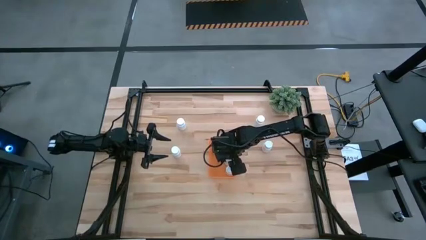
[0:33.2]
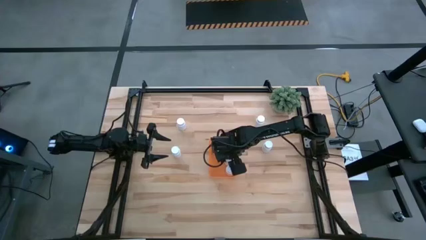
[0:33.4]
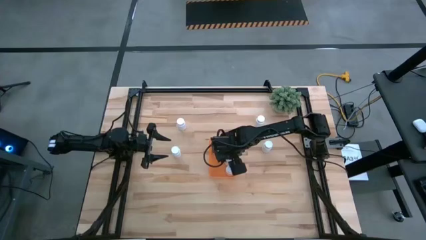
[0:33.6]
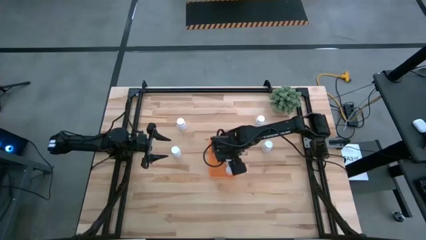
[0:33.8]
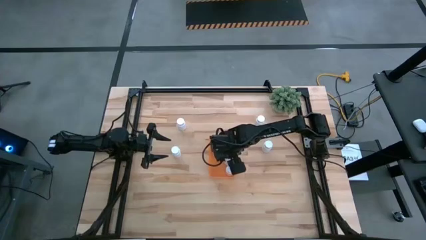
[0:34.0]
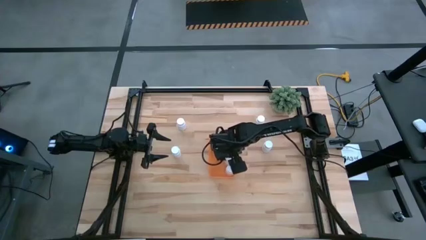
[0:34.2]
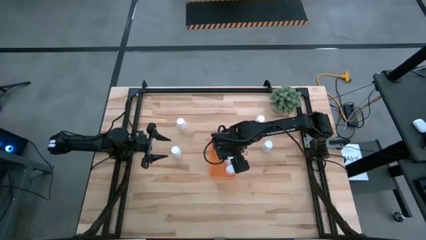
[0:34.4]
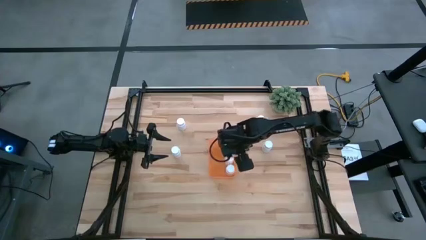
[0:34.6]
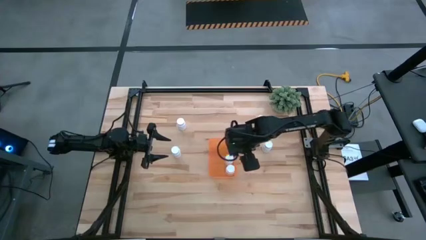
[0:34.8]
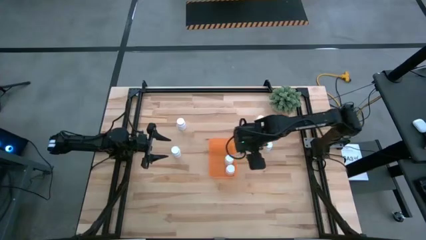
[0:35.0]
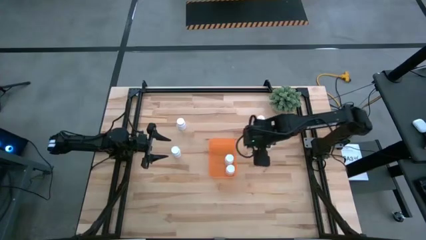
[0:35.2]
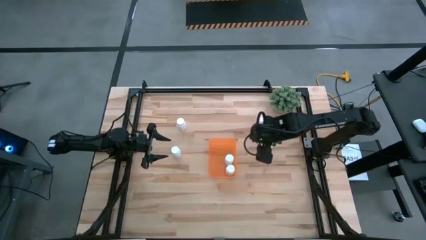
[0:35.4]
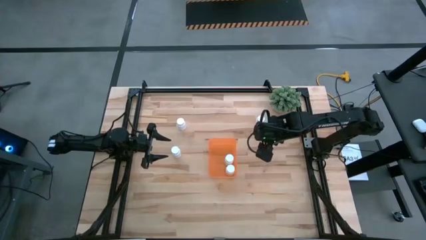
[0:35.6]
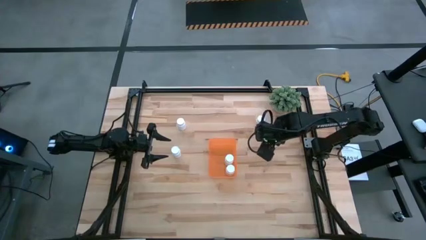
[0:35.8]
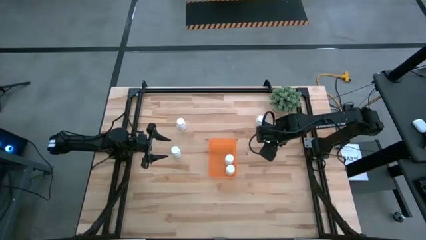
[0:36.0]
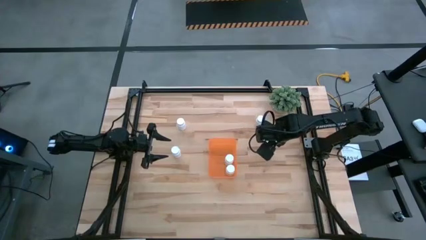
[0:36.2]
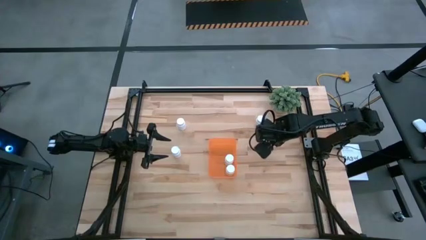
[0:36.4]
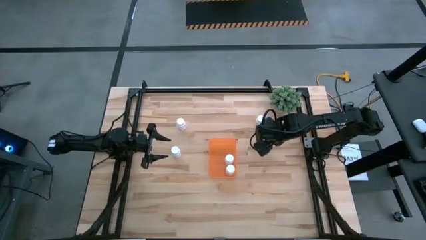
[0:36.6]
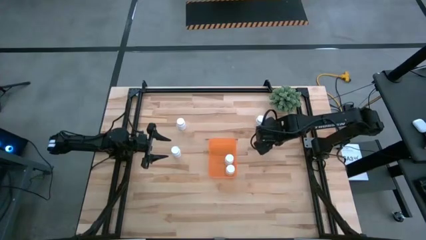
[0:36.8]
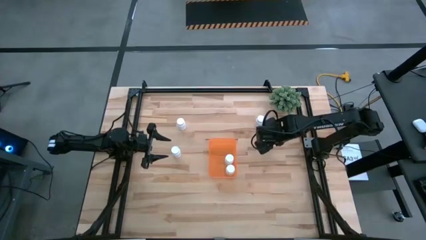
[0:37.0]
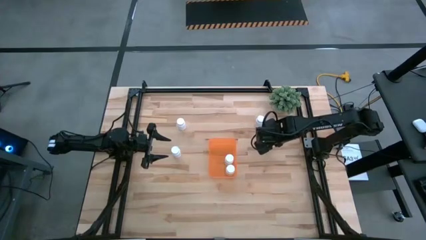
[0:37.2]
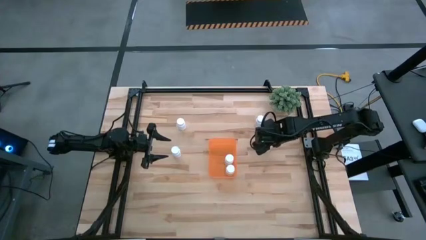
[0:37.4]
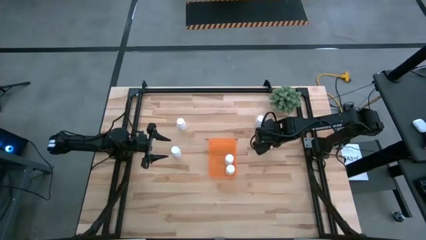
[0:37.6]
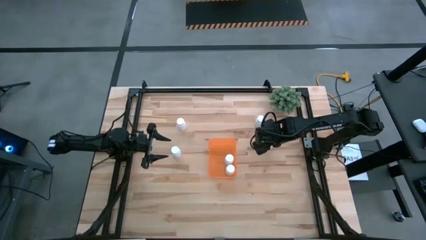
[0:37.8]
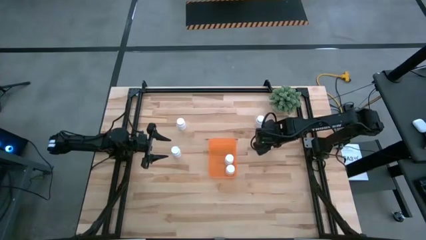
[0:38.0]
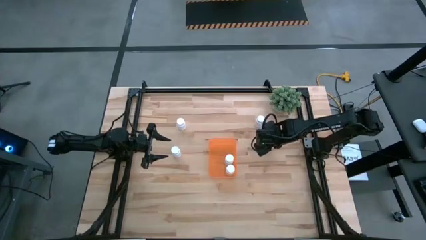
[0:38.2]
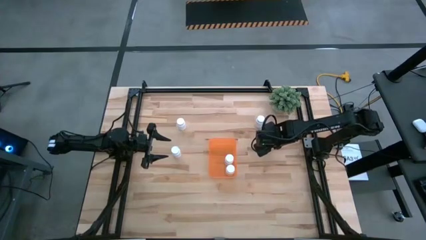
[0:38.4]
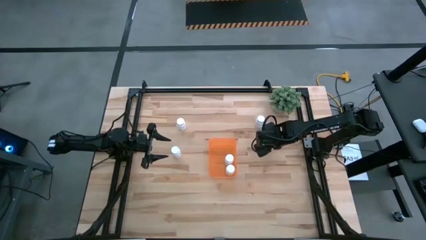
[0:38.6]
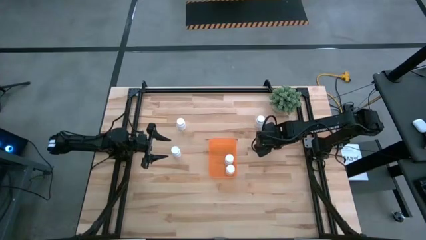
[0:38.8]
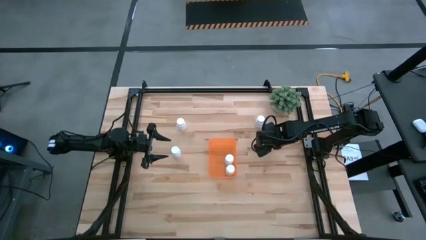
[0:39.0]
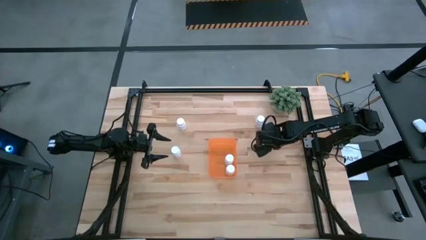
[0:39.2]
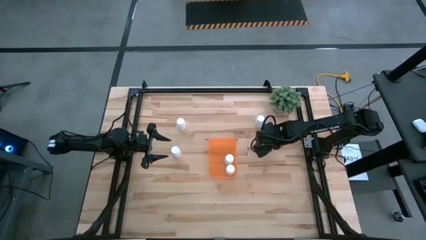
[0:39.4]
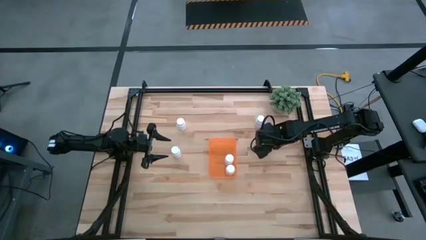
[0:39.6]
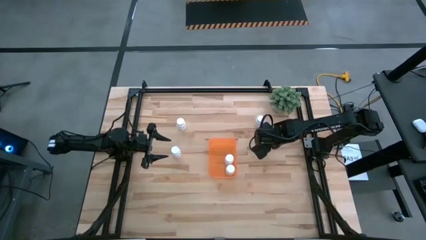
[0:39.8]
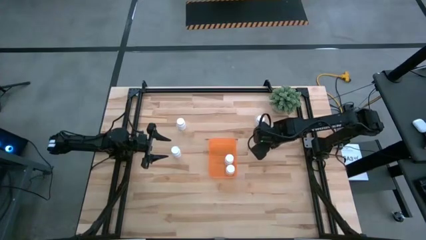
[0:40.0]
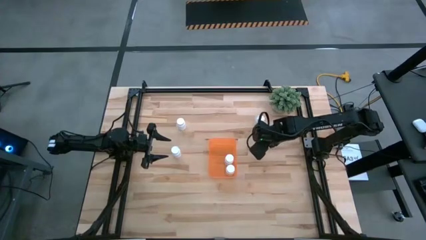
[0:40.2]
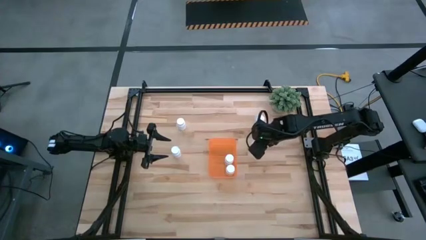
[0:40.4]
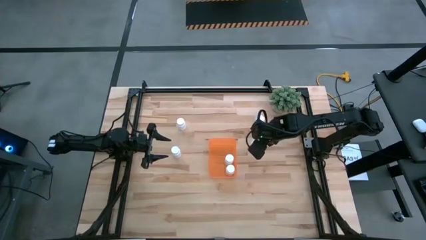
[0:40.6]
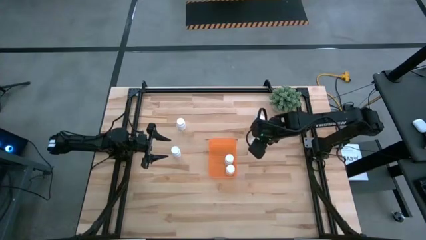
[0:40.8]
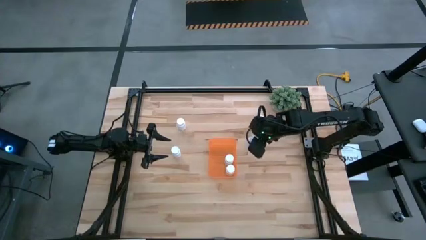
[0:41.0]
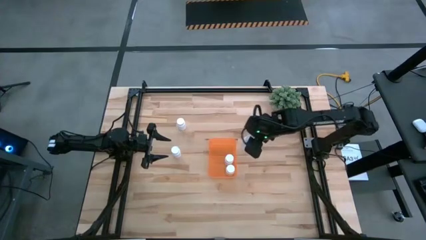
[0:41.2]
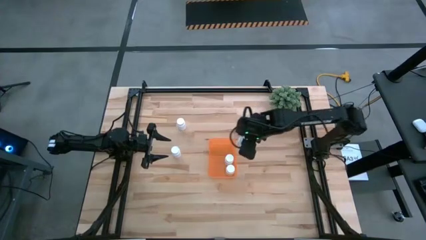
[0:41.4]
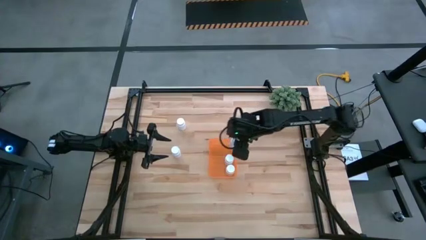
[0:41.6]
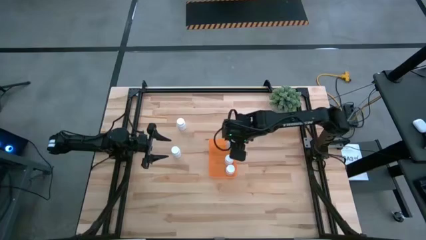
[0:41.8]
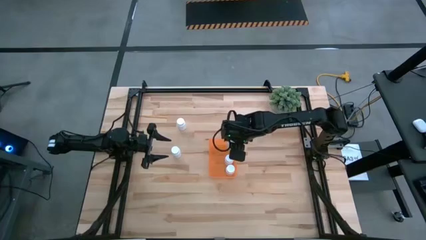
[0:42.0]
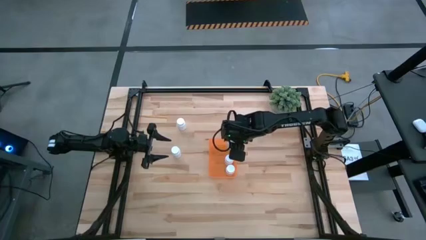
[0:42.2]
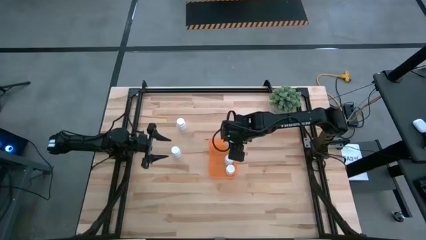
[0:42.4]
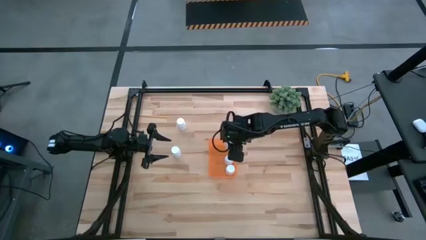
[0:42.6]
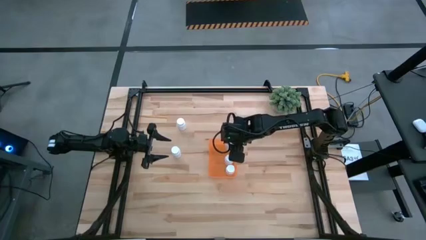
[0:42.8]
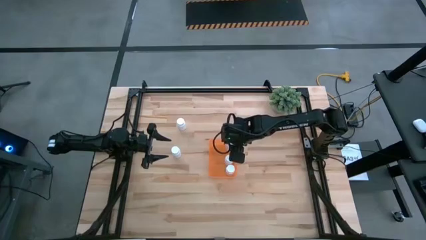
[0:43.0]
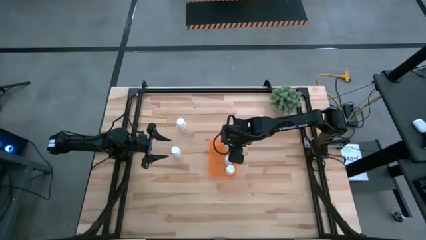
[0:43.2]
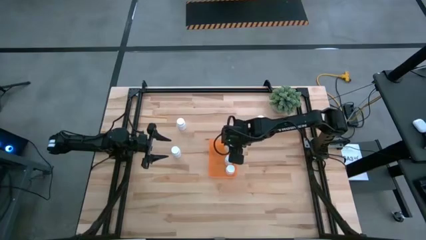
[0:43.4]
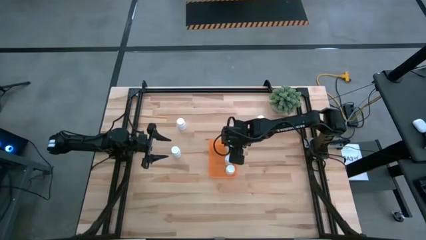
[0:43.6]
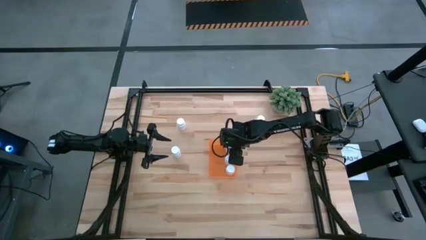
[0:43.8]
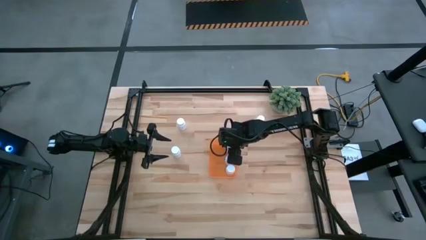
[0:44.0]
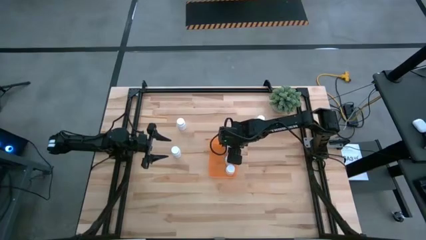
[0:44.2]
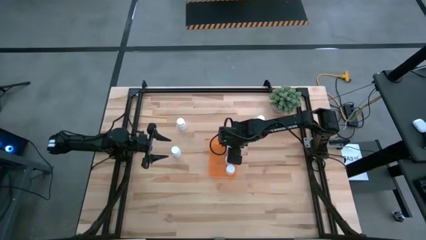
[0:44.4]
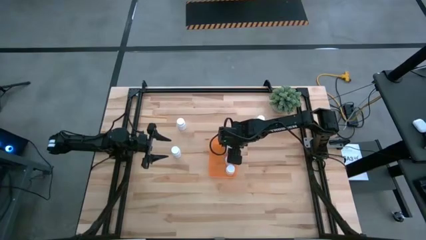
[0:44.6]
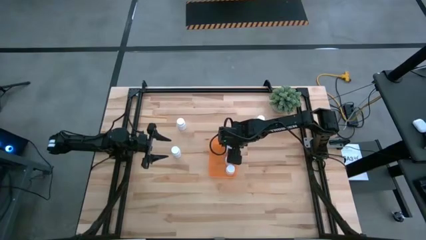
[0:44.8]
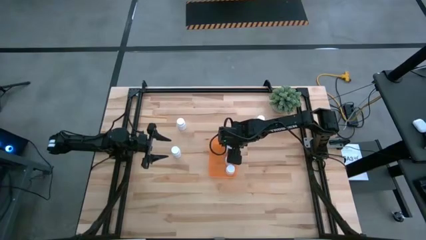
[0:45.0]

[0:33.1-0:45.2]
Task: Pick and place pill bottles into a basket
Put the white pill bottle into the orange bin

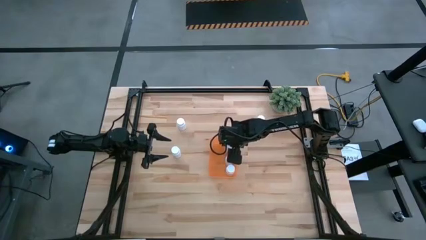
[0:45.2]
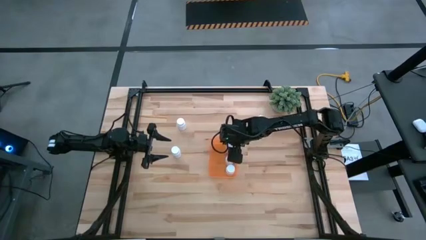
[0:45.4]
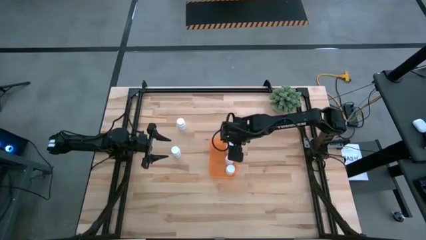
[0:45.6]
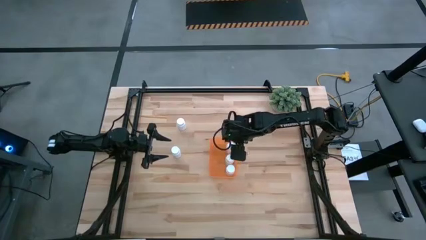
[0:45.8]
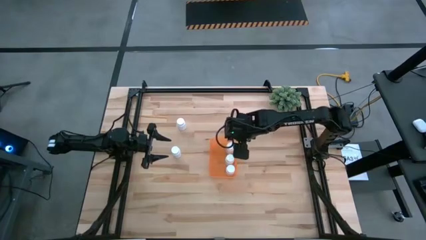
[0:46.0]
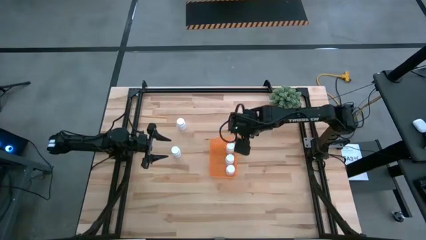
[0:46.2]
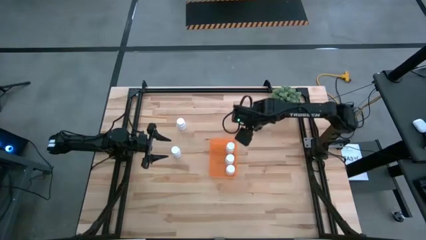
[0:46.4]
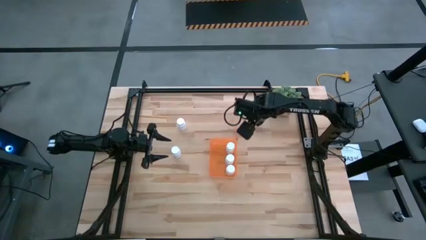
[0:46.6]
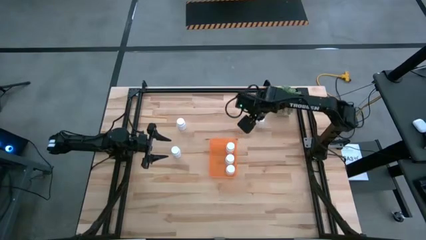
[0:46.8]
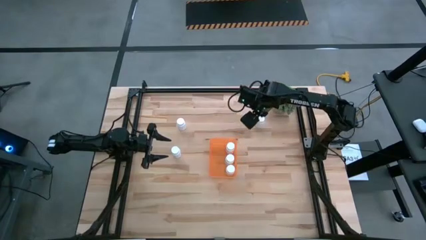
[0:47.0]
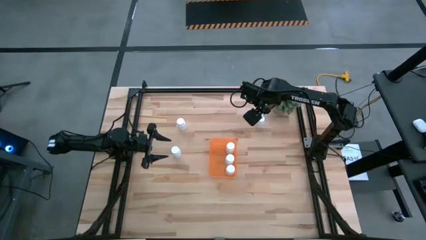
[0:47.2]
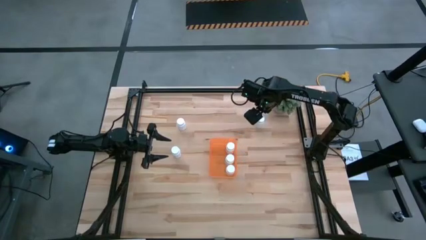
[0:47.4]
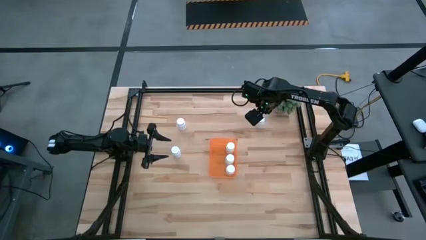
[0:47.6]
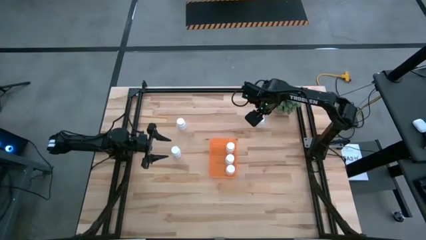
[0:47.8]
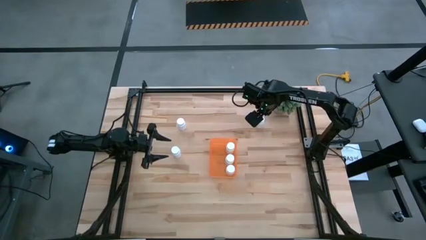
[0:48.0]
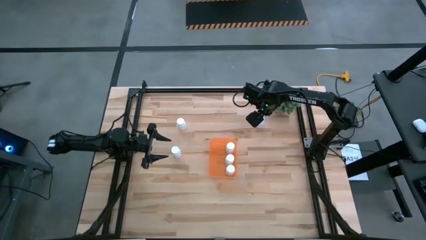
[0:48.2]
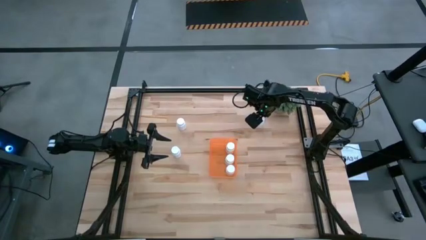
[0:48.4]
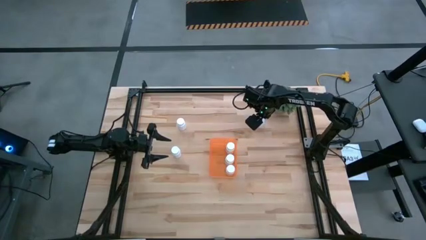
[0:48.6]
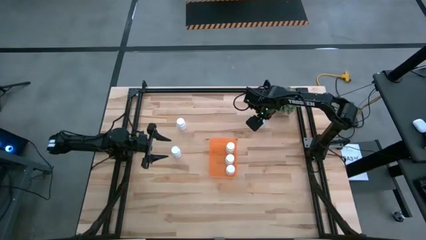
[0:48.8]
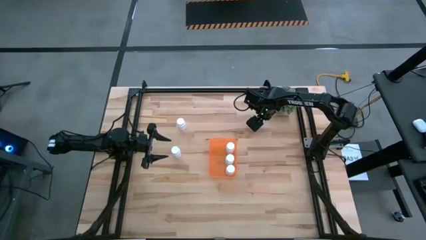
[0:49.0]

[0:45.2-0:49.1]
Put the white pill bottle into the orange bin
